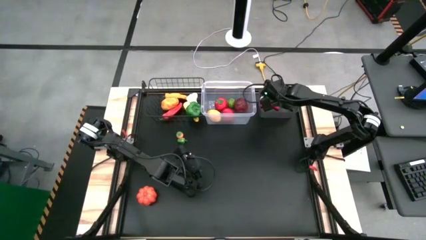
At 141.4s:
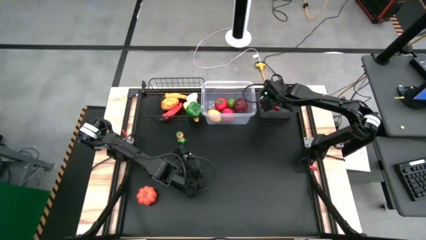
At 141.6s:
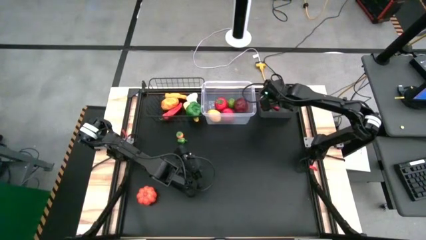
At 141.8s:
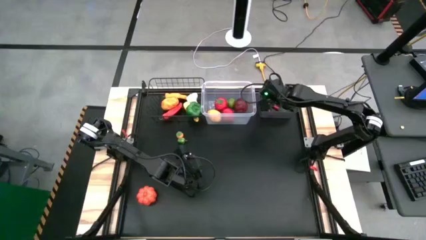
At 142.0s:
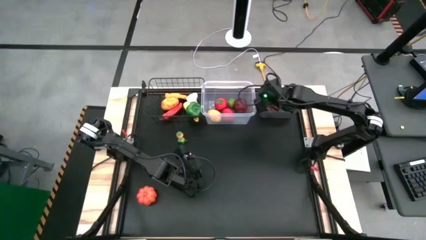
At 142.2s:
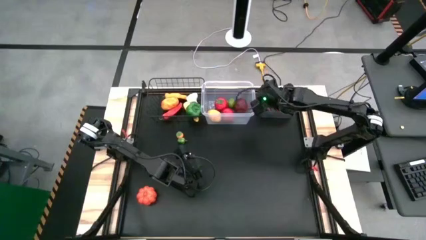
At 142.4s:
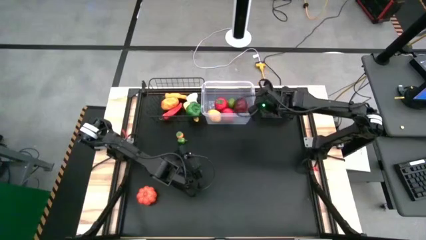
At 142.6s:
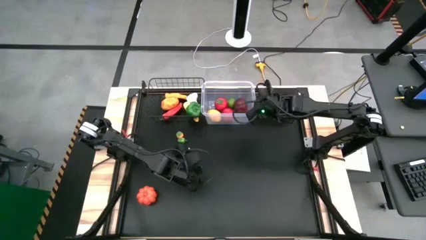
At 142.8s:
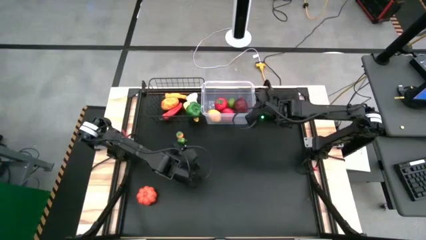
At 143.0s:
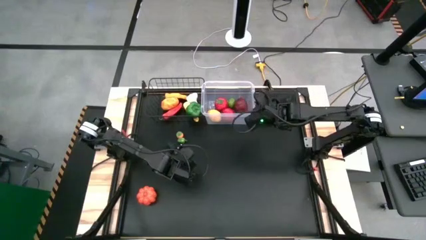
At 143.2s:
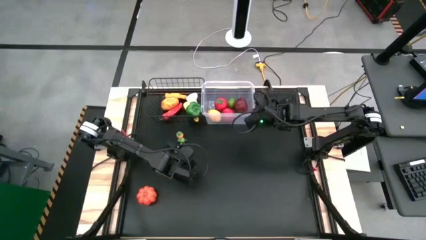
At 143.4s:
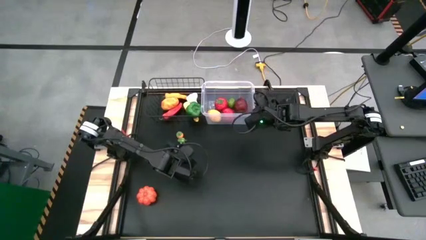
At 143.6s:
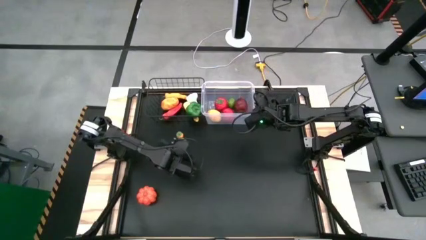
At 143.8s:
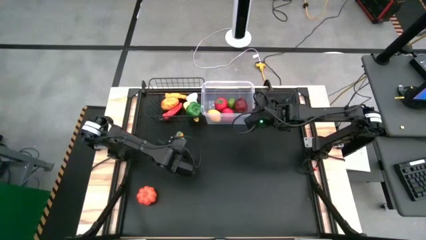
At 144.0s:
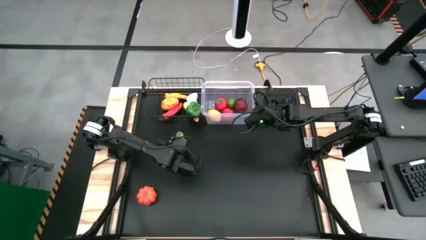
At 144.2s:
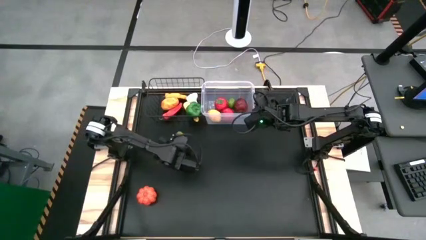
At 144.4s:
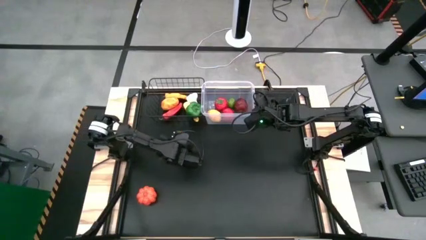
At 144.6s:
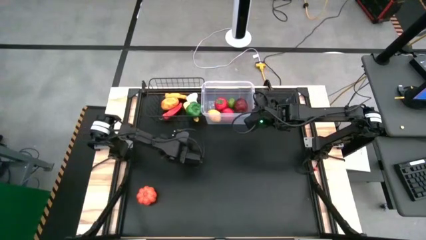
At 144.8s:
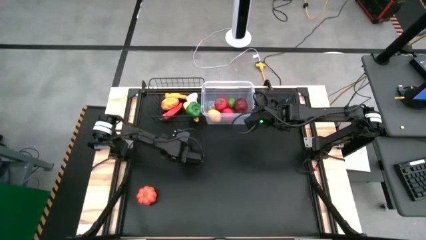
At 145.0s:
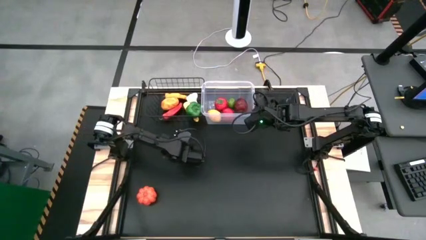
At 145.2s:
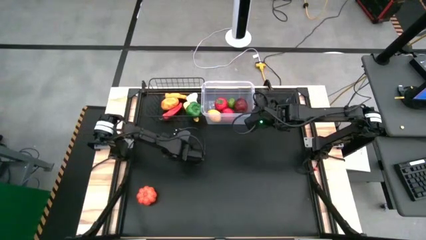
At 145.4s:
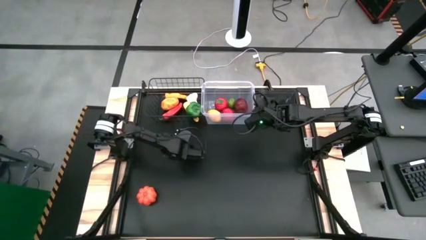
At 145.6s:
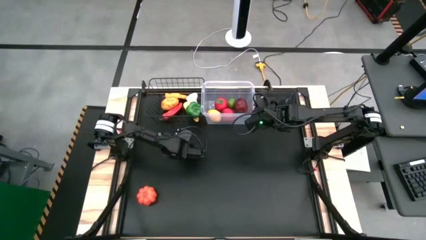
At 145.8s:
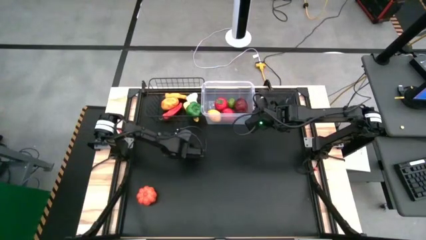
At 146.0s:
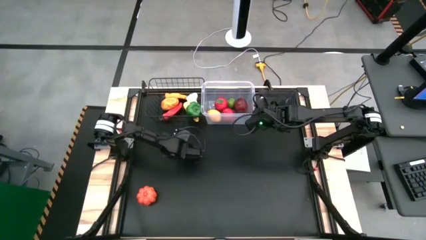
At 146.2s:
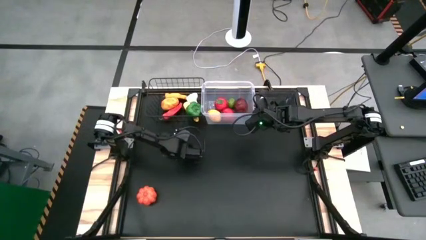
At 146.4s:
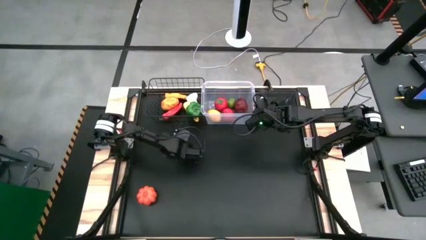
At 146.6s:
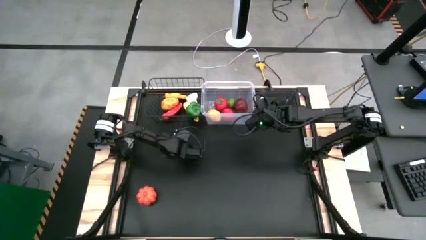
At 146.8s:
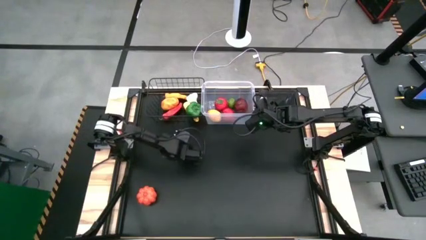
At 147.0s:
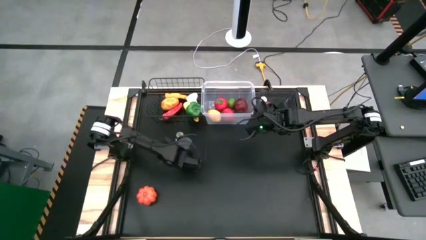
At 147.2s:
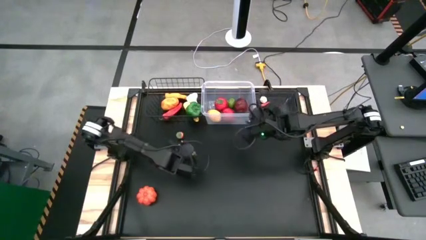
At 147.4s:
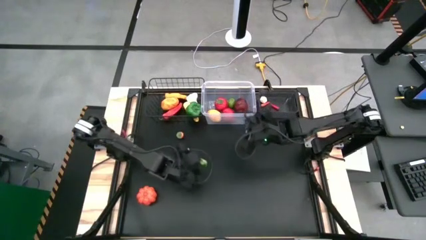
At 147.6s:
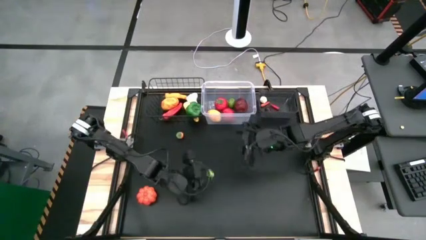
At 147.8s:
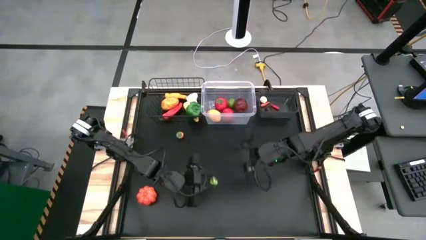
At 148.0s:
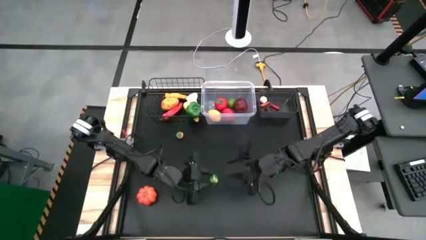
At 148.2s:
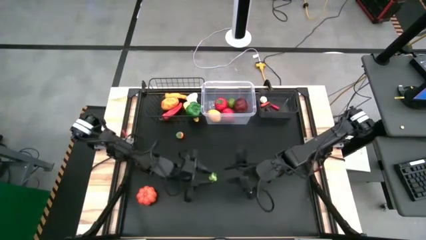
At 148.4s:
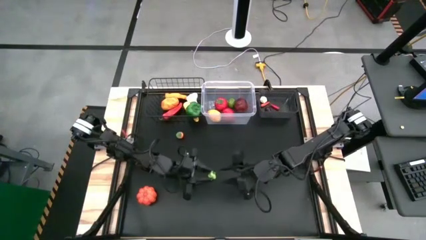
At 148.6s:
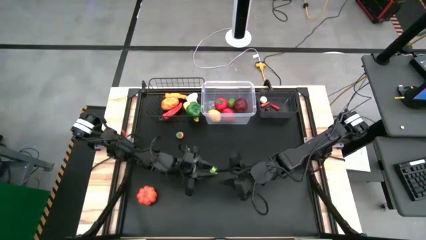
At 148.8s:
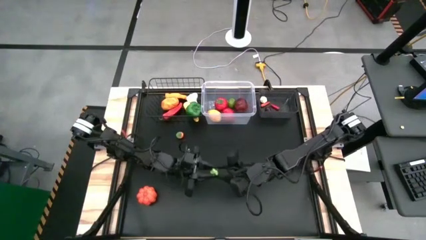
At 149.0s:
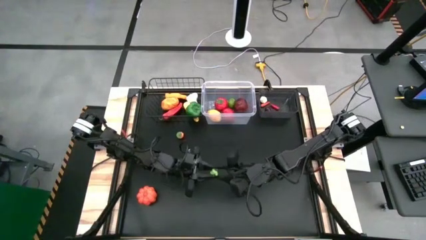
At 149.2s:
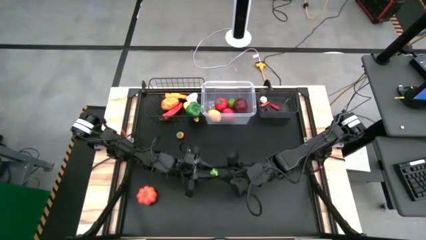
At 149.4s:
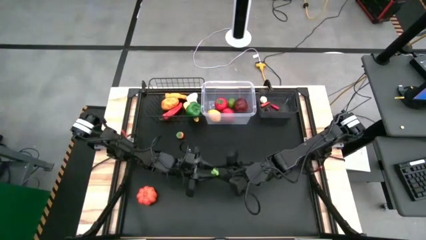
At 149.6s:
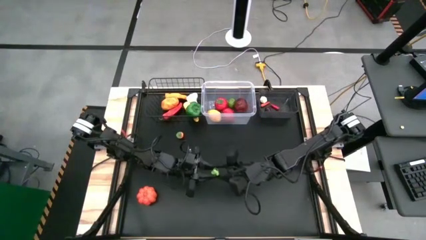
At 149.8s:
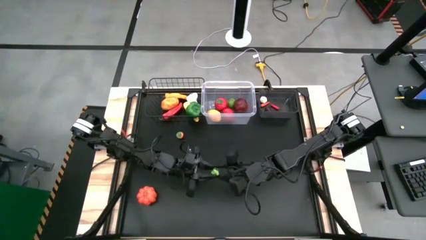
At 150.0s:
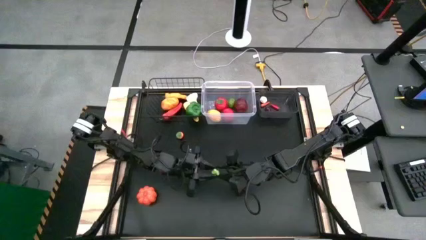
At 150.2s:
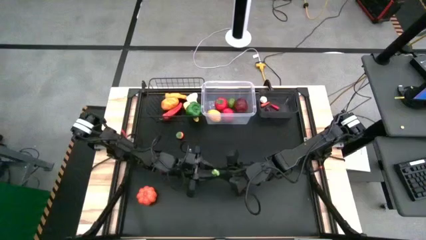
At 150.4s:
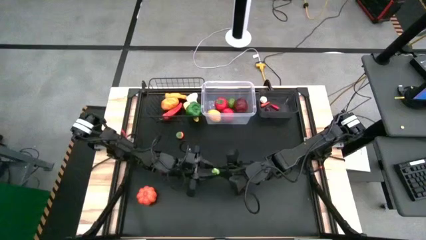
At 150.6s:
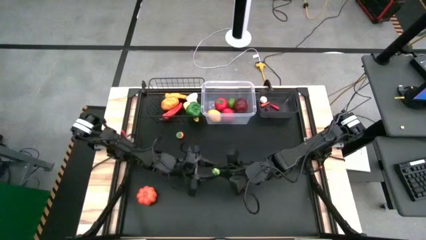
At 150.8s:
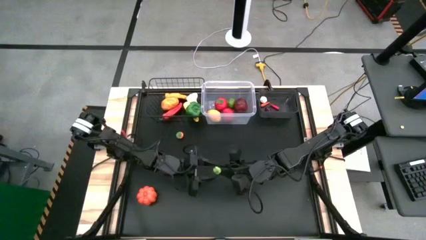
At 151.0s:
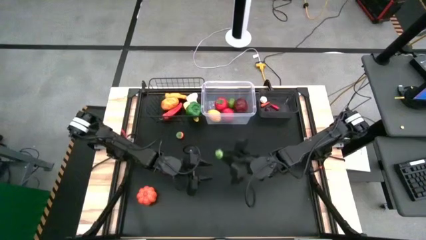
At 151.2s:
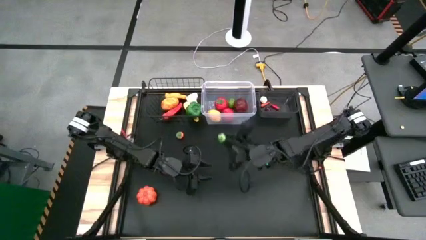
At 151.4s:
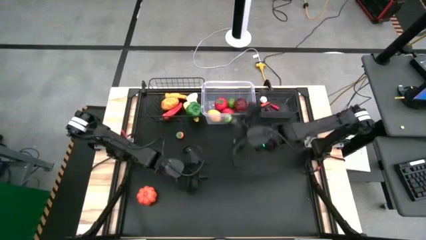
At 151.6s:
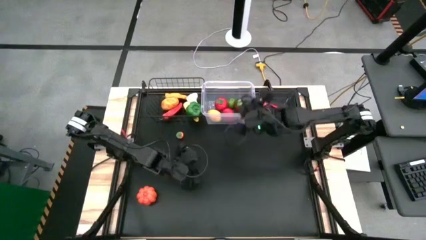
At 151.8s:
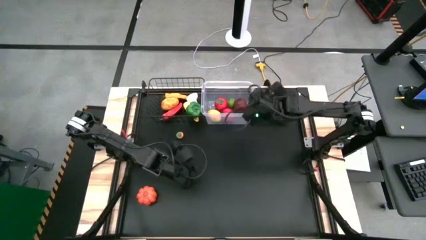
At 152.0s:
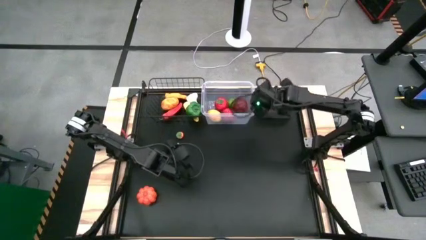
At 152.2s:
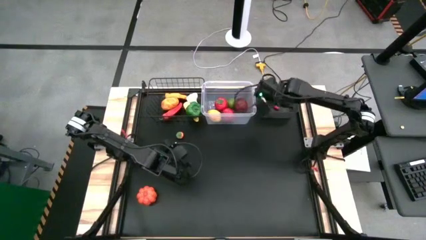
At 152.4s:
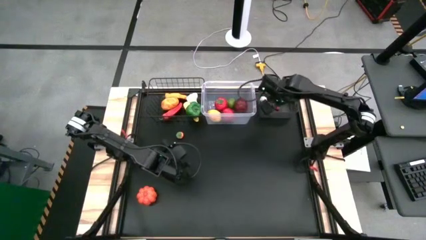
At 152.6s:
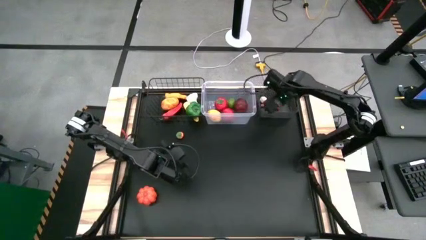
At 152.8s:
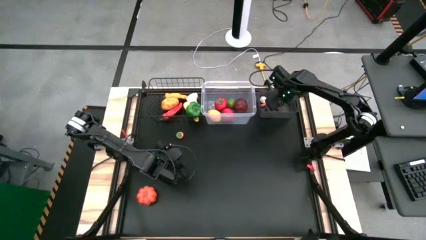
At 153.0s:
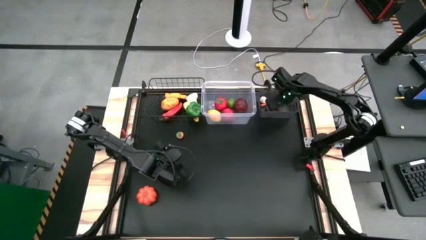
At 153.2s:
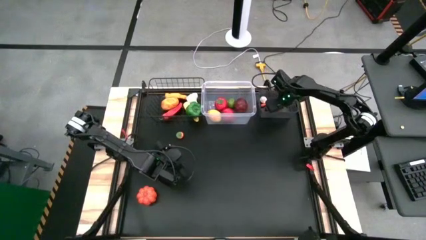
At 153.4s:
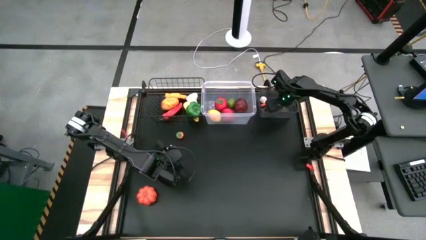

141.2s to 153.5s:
Task: Sort produce into baskets
Put the small green bell pepper into the black bin

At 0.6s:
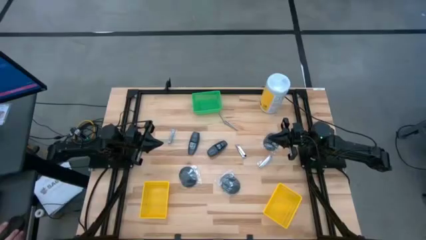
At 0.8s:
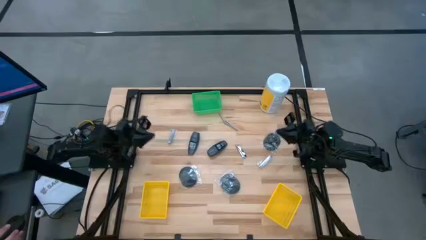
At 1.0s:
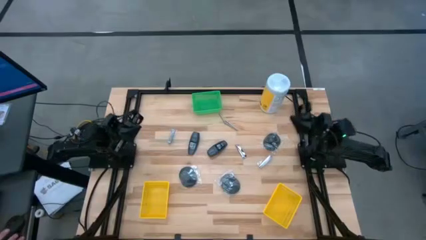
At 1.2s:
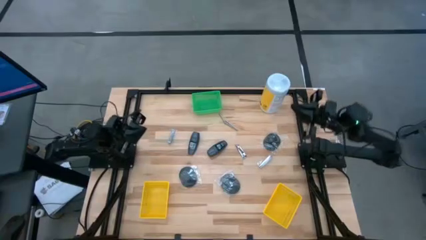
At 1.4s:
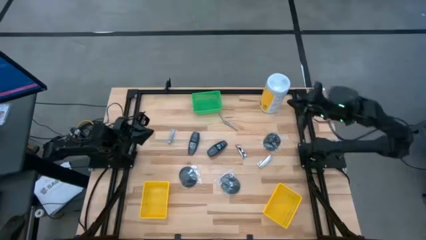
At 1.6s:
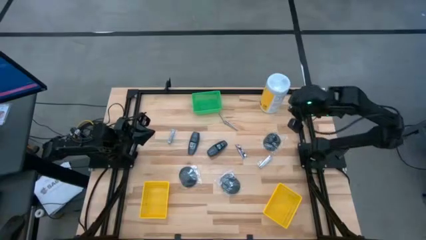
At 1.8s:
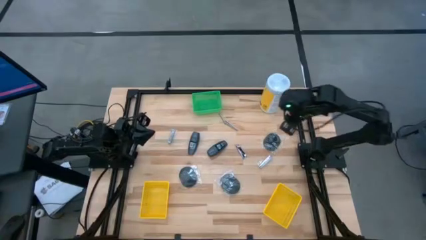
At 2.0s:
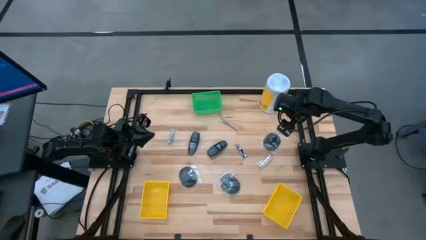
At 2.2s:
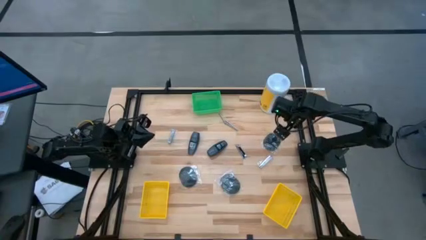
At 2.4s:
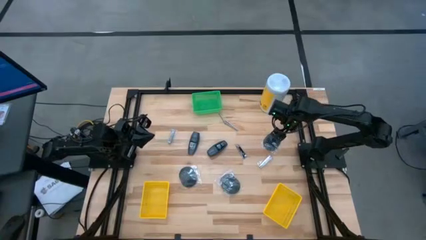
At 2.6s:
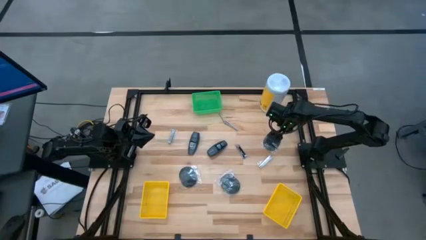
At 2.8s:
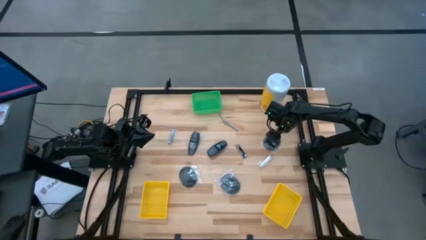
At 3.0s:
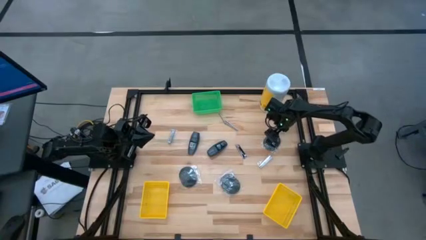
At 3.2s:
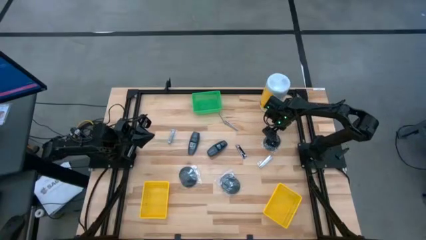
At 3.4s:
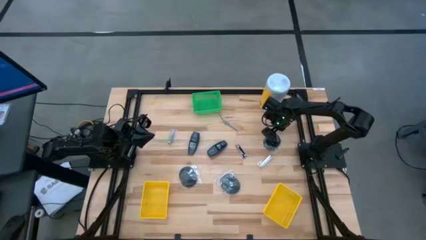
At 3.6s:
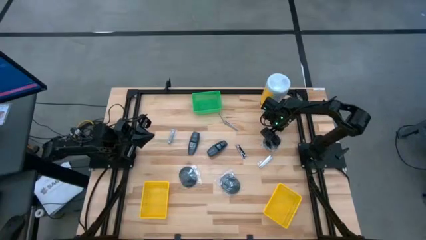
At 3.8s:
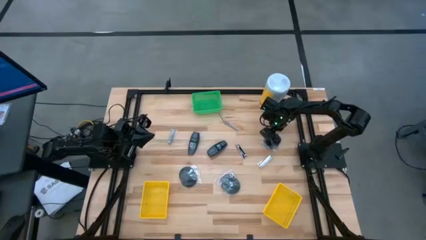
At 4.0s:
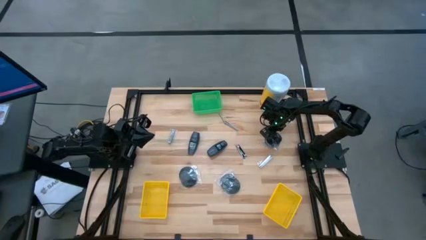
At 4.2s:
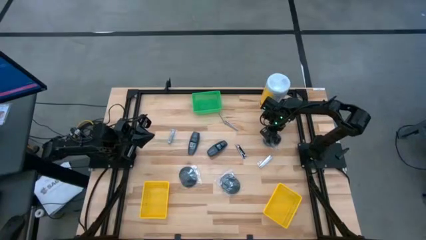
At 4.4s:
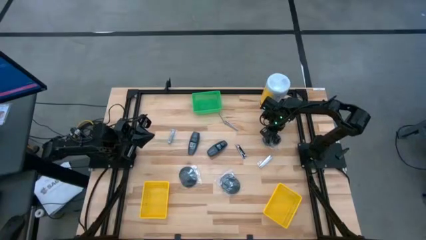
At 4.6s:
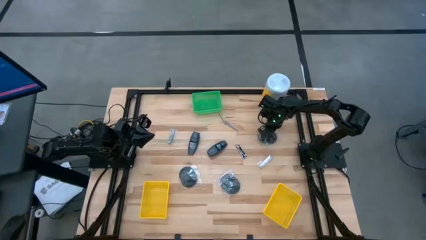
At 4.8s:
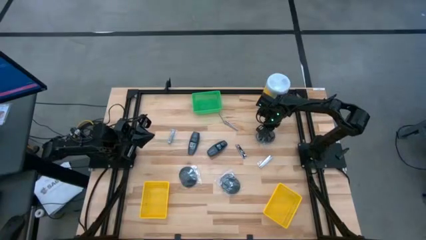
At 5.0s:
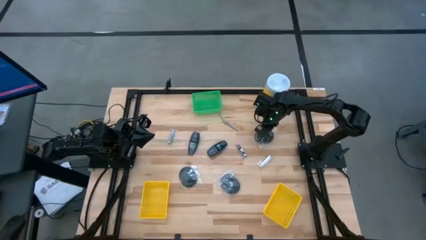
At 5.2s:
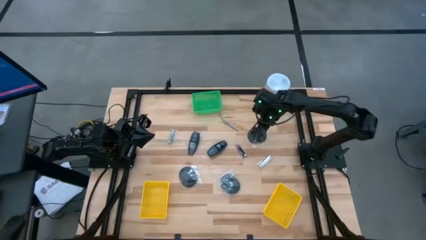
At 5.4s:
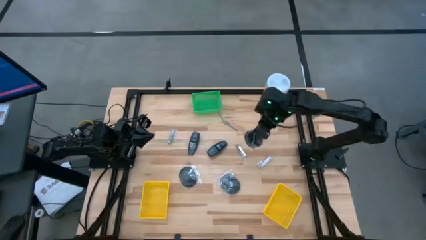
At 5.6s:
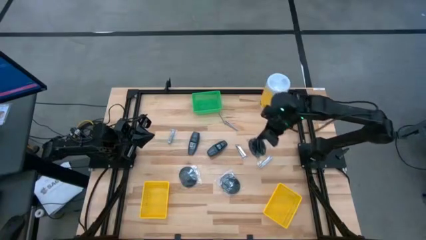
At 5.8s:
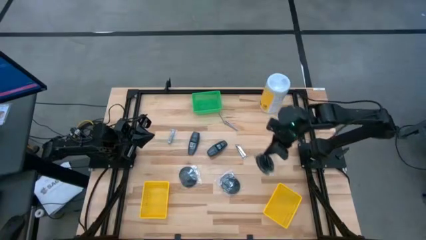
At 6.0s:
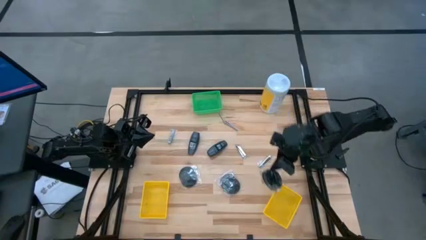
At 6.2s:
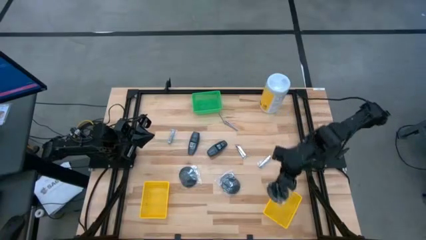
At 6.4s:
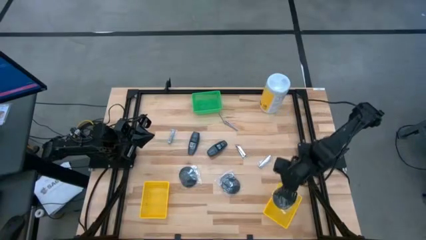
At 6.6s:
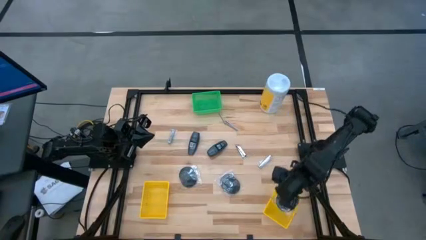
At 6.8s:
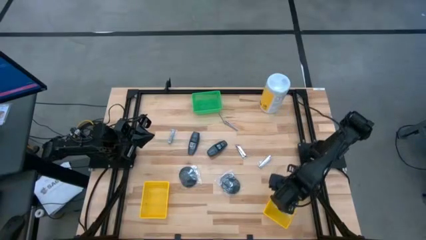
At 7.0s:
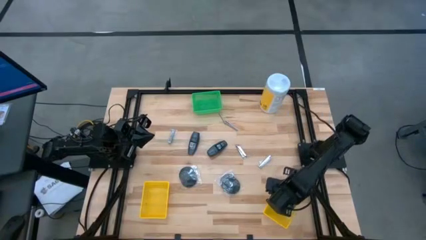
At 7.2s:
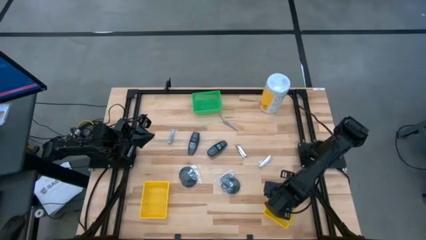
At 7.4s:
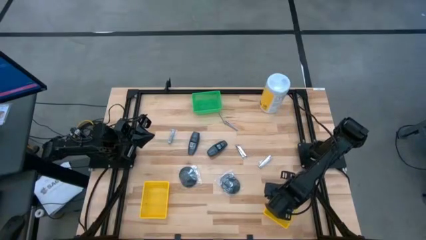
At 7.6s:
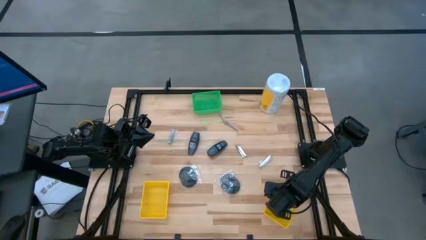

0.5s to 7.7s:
Task: Pick & Place Travel size toiletries
Put the black hairbrush into the right yellow bin
